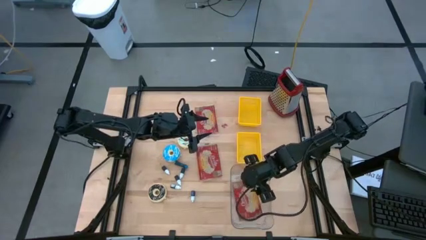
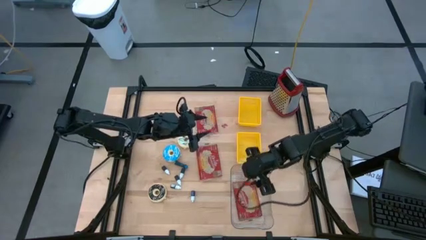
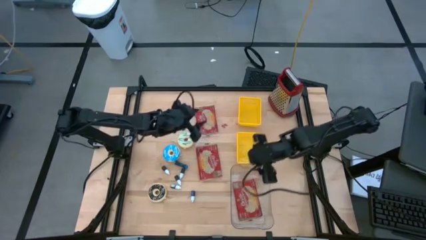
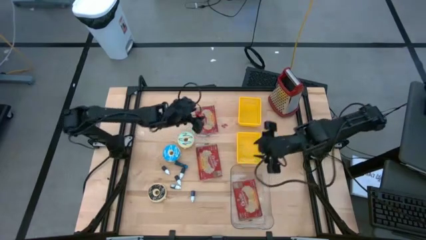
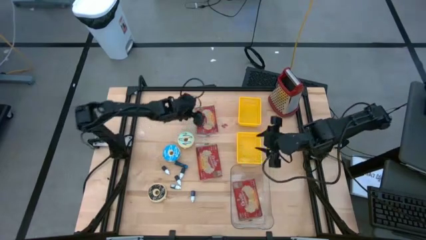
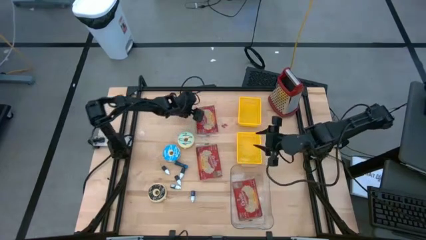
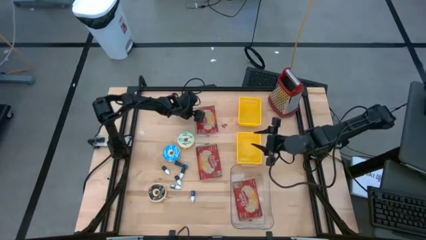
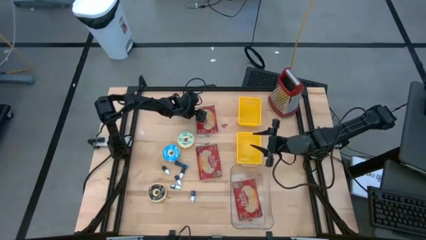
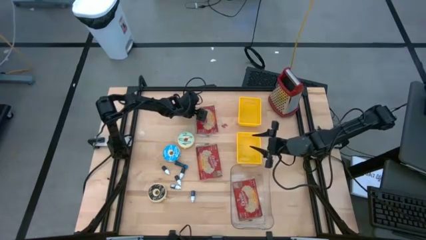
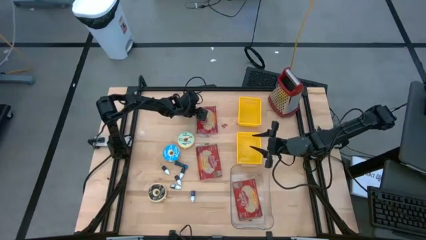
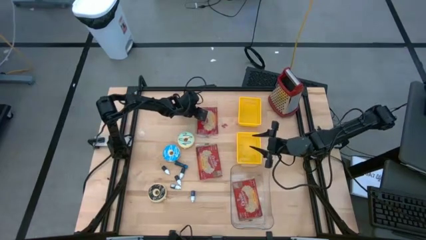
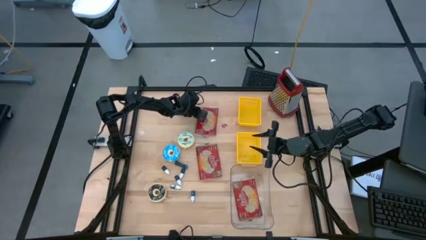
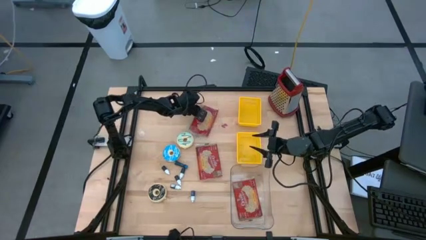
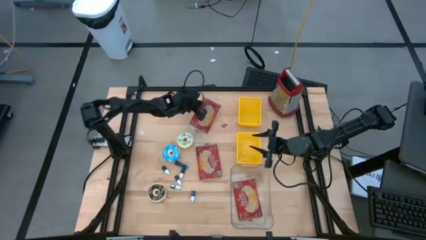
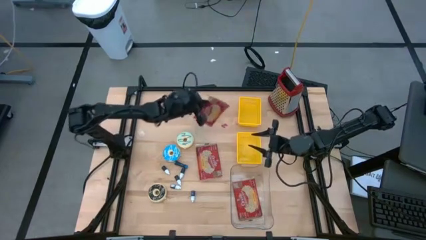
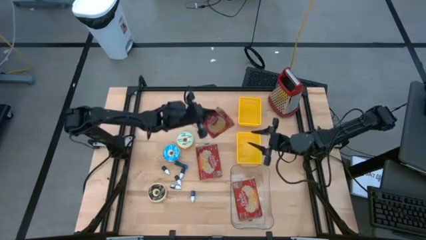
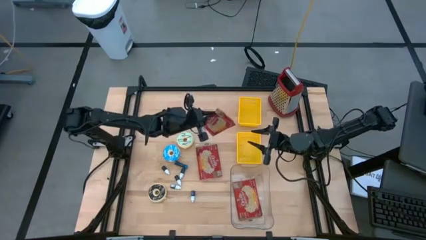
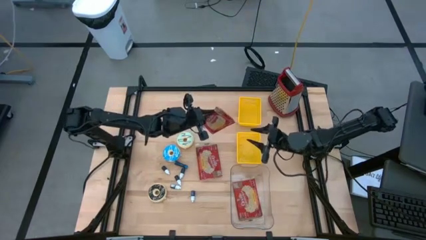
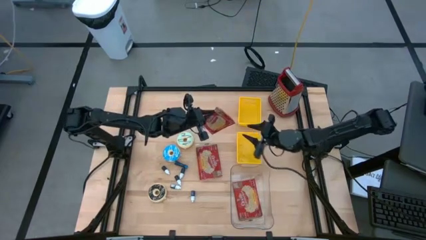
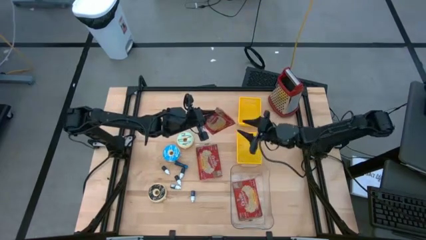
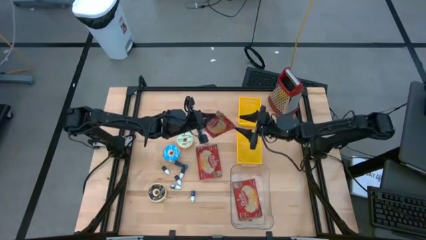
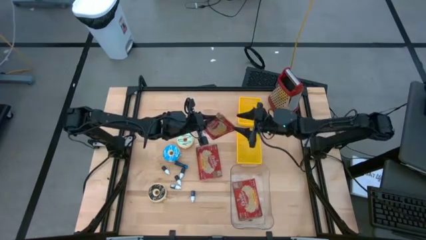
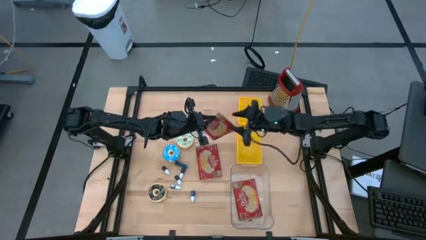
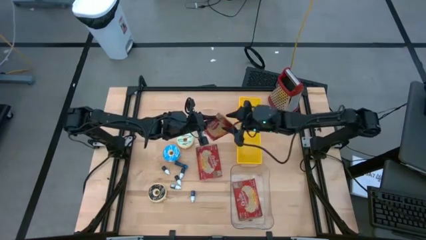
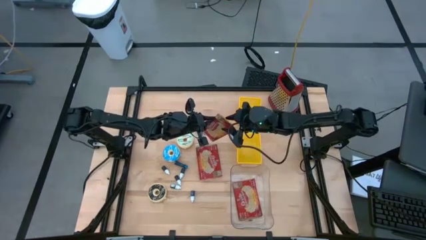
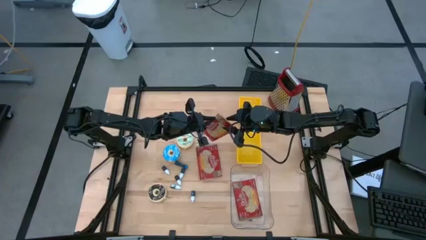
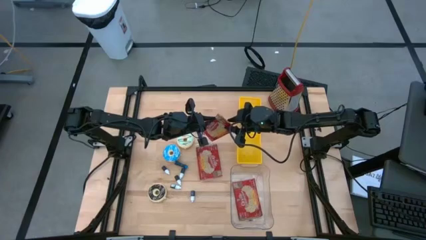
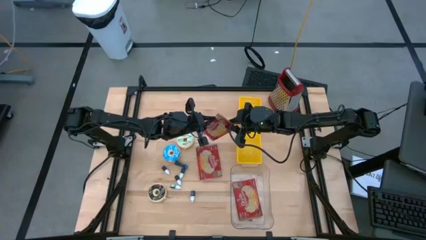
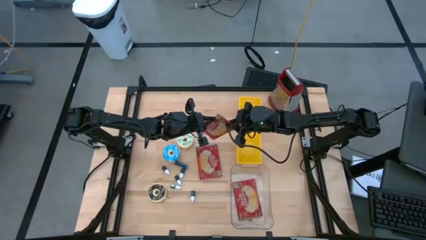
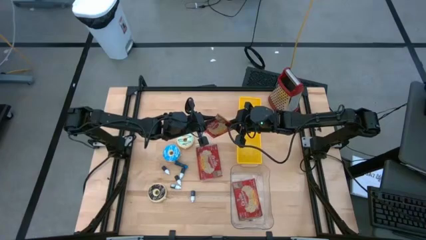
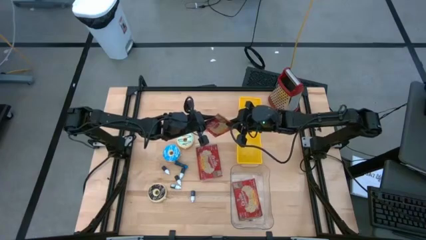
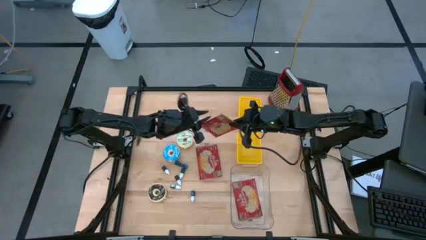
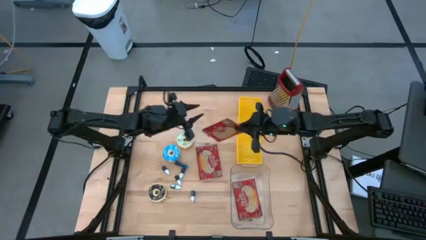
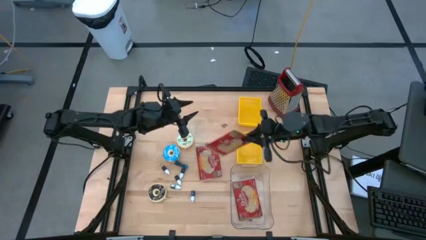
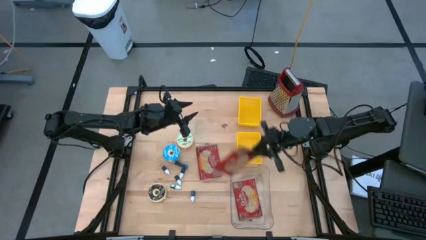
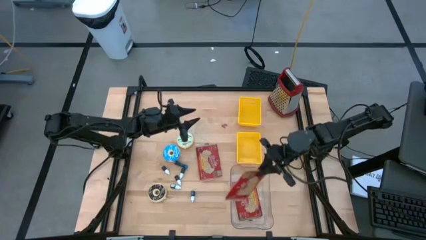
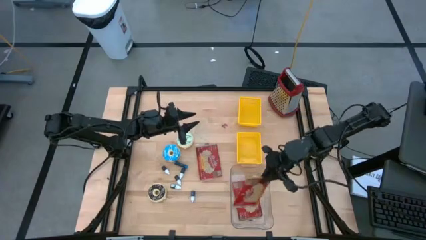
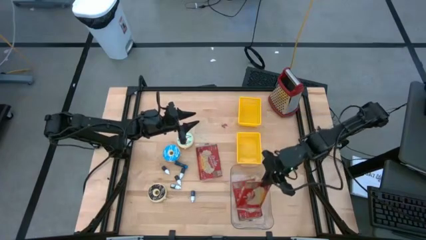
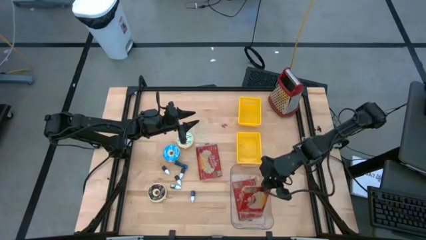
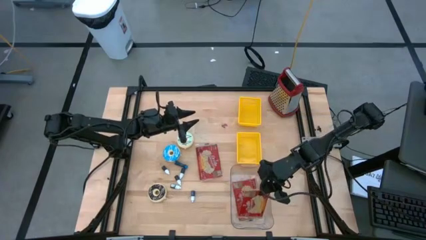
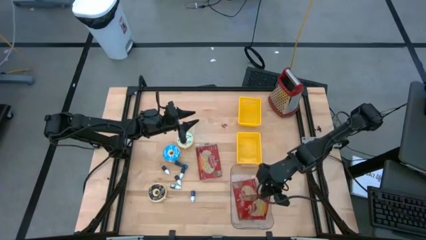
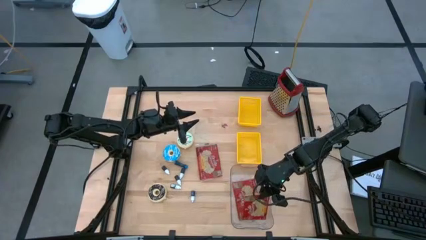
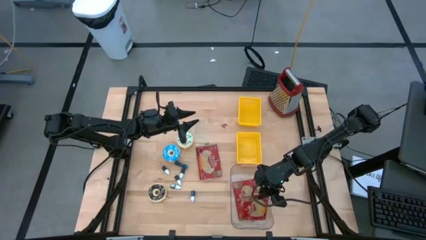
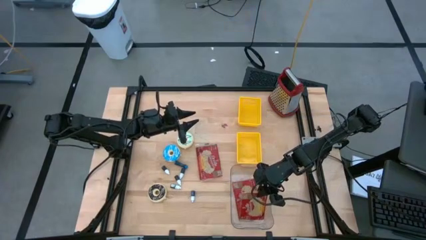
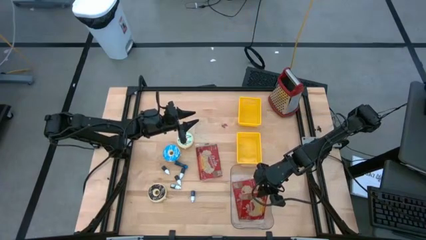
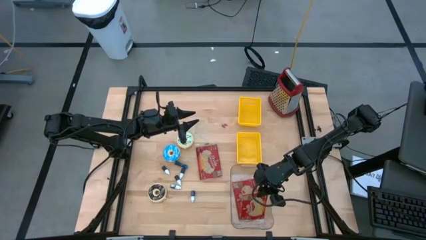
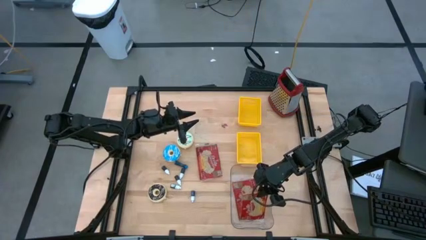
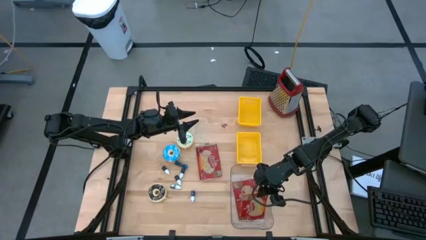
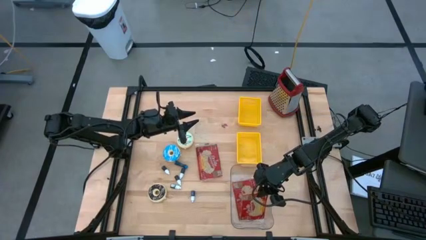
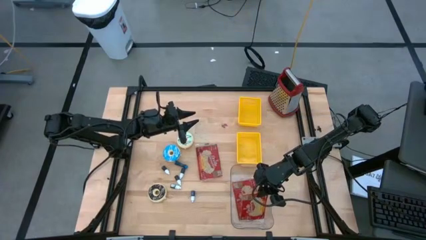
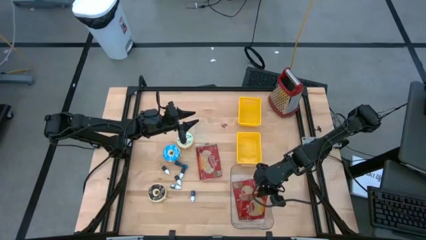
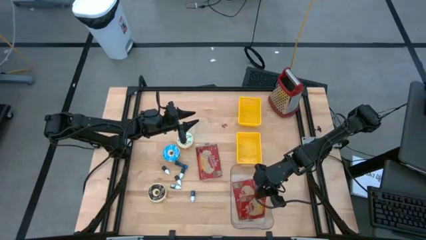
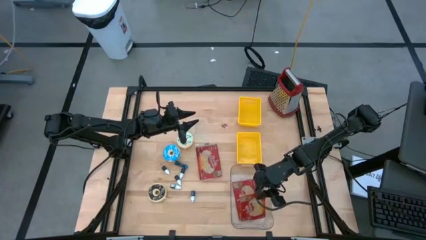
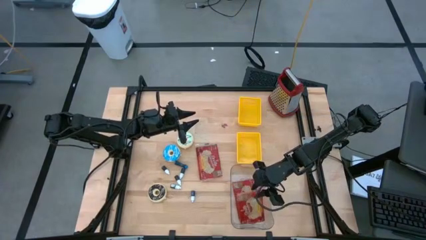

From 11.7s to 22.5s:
Put the top red popcorn bag into the transparent bin

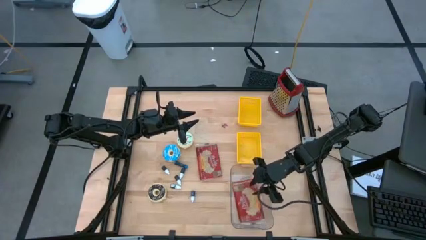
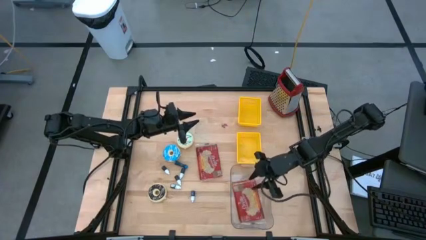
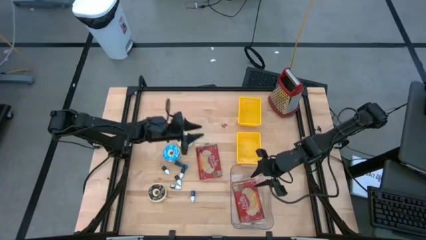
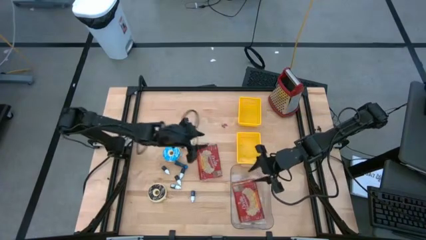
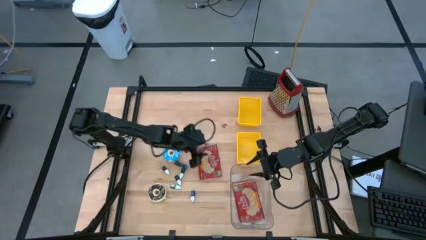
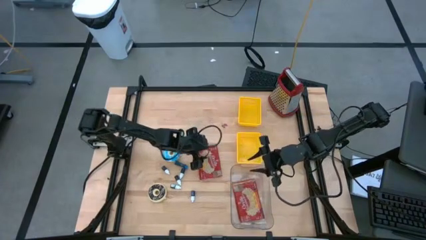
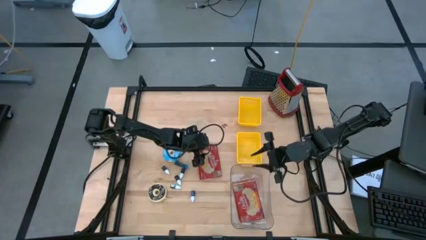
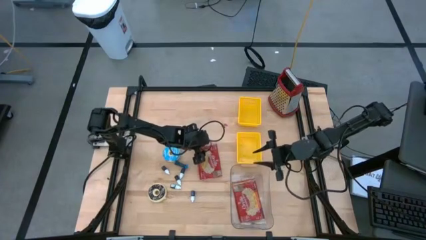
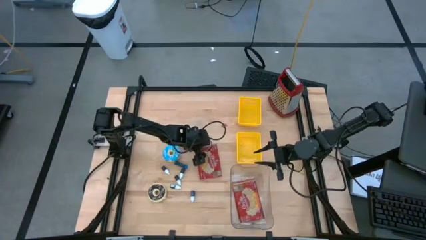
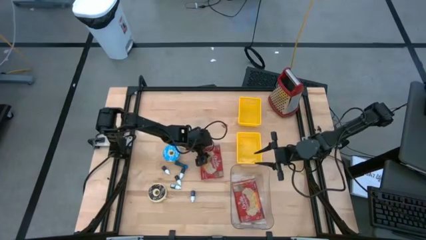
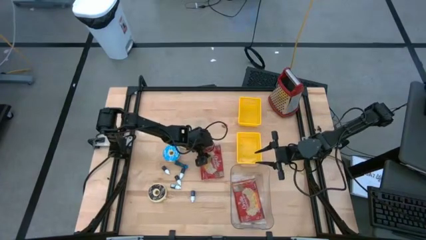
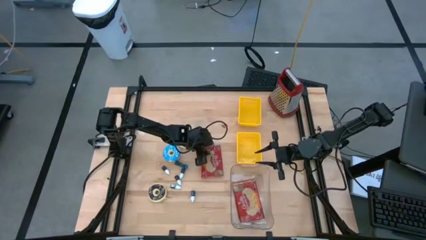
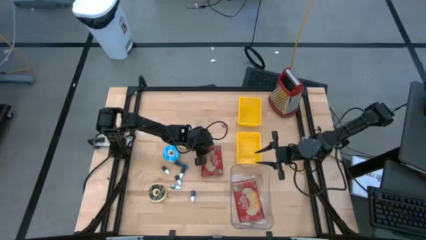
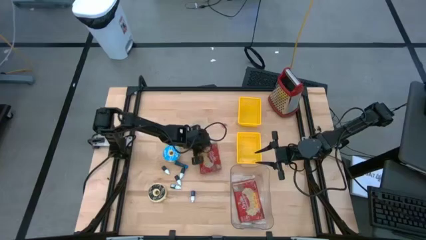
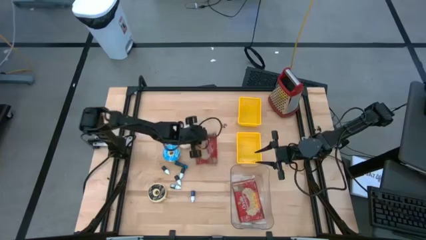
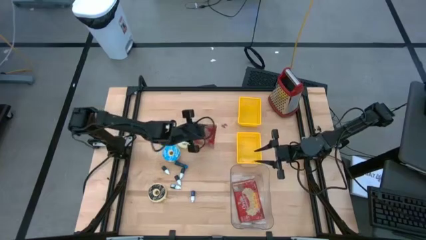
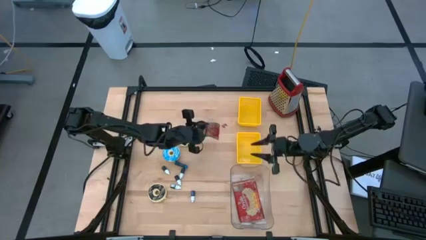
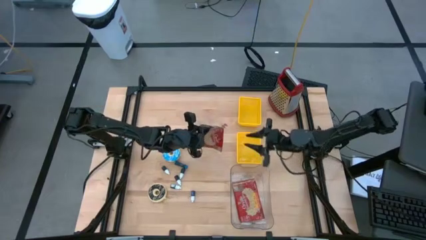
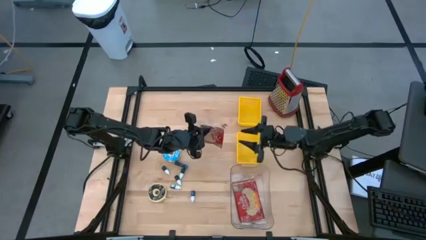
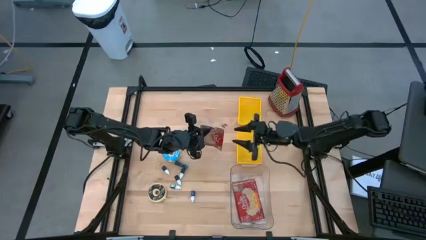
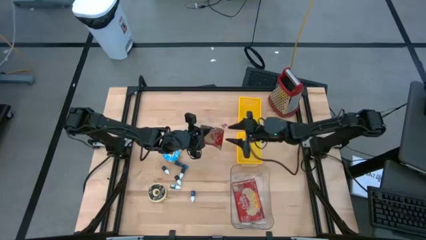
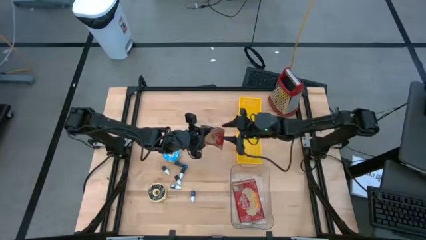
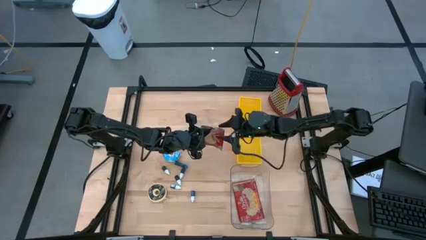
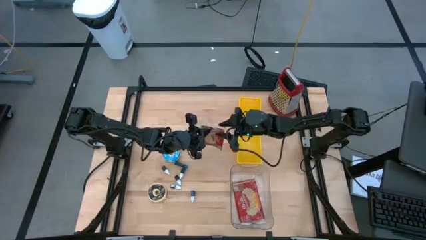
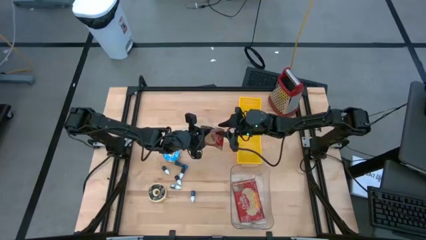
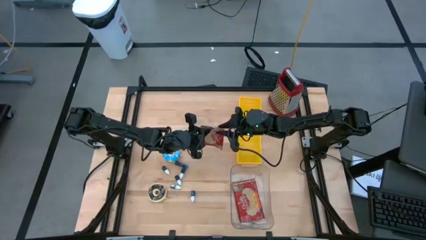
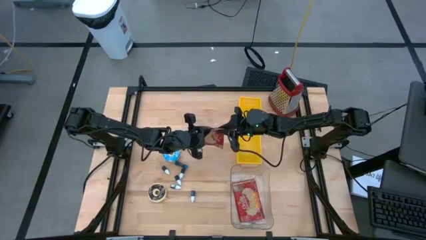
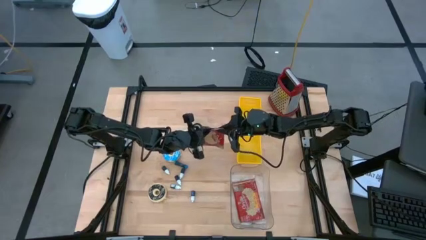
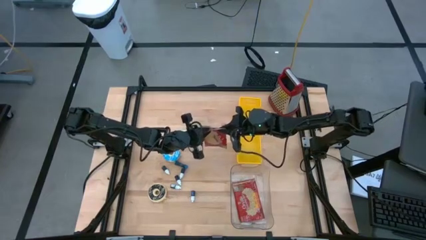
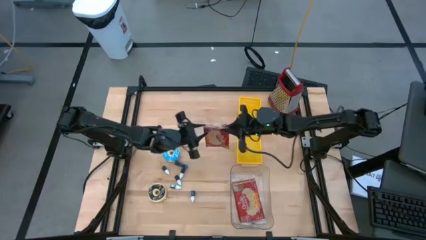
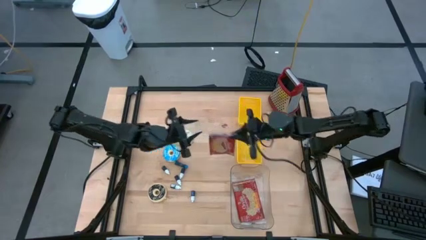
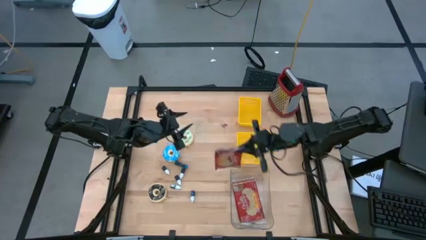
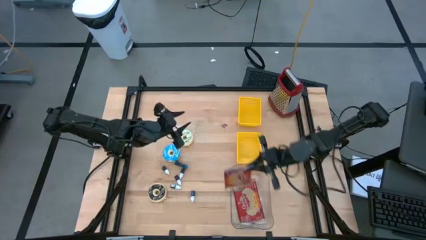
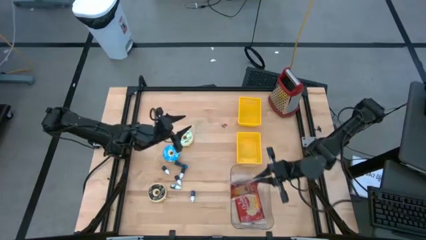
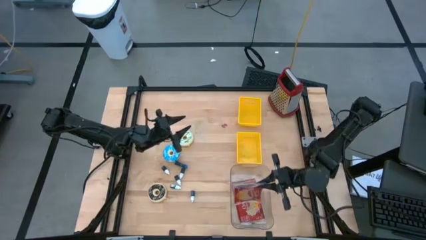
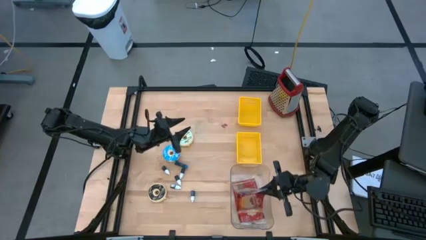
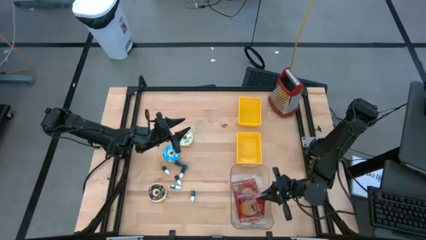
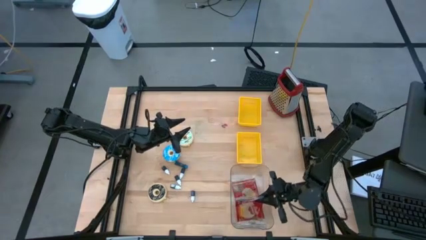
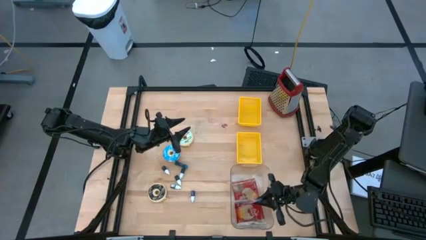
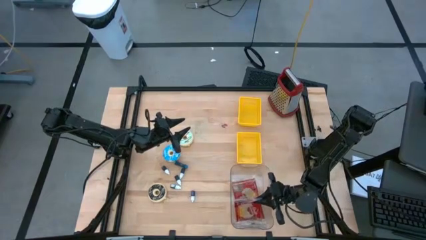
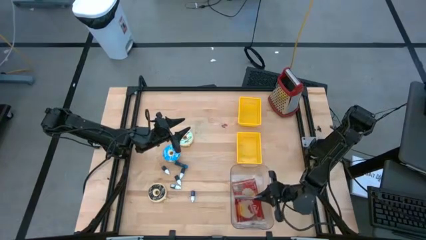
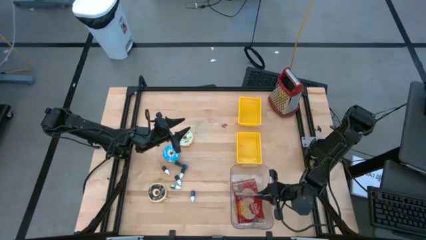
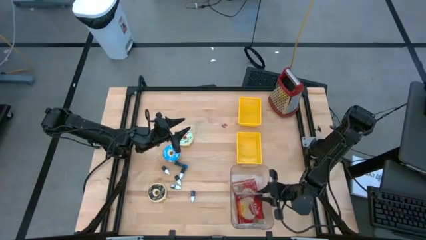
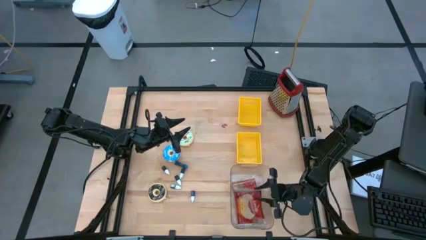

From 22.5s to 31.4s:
Put the red popcorn bag into the transparent bin
